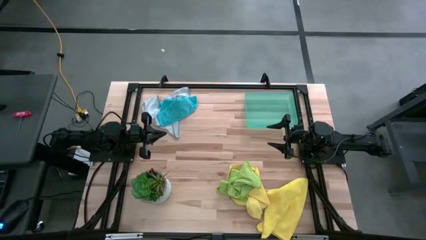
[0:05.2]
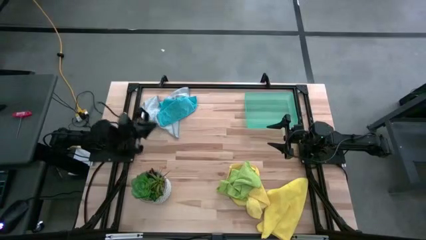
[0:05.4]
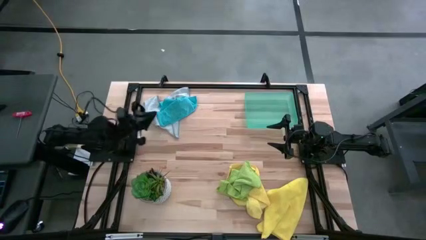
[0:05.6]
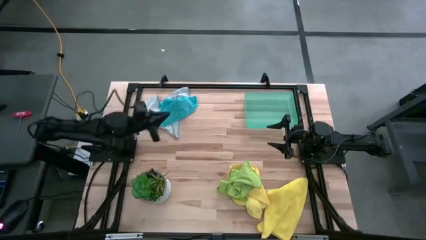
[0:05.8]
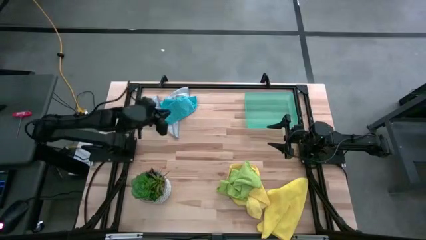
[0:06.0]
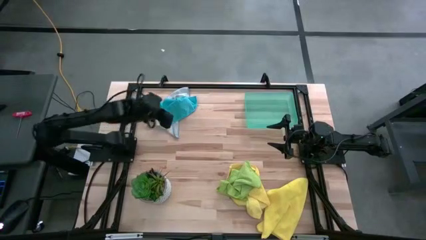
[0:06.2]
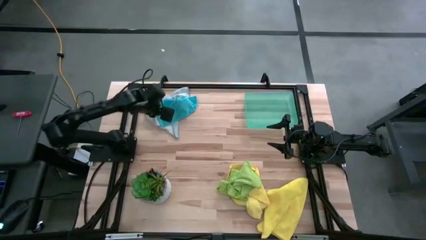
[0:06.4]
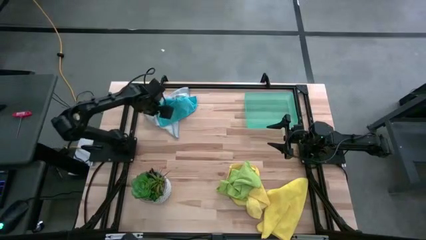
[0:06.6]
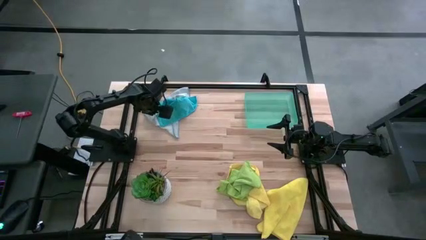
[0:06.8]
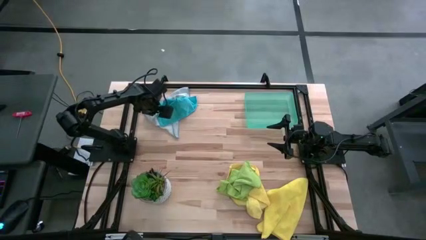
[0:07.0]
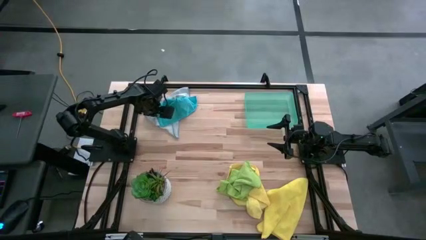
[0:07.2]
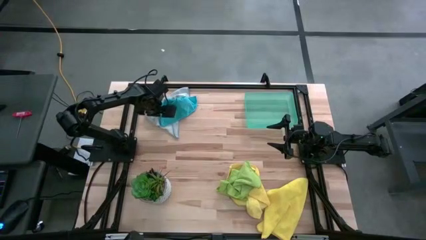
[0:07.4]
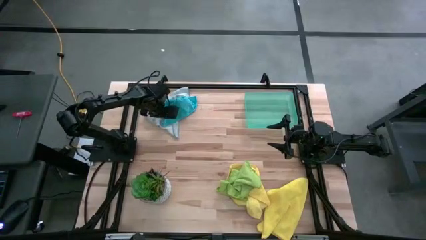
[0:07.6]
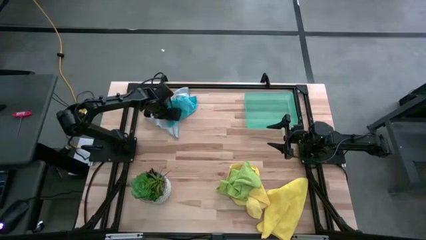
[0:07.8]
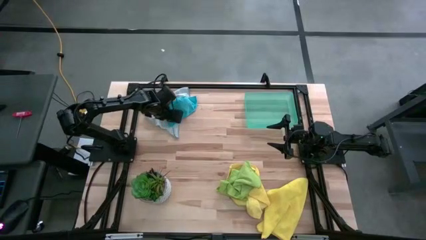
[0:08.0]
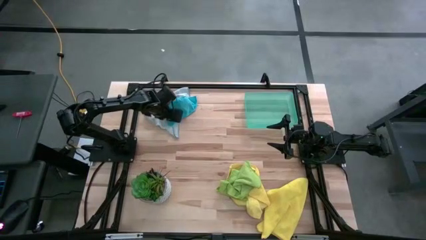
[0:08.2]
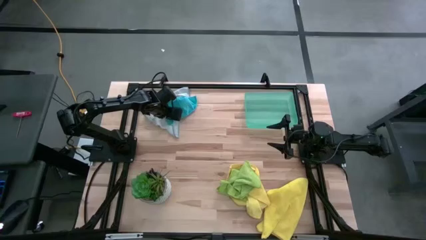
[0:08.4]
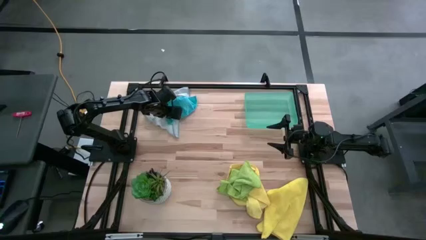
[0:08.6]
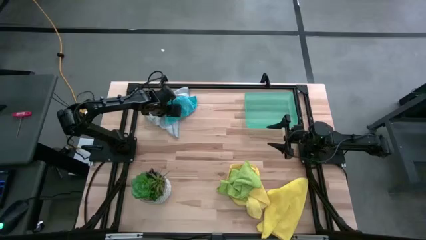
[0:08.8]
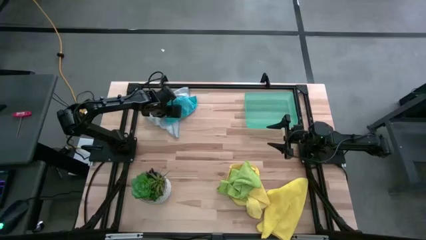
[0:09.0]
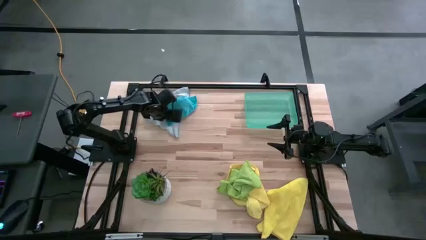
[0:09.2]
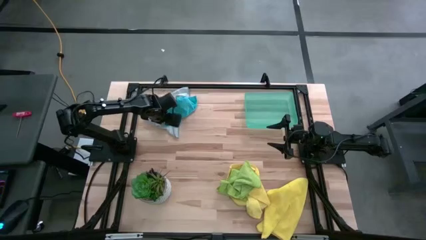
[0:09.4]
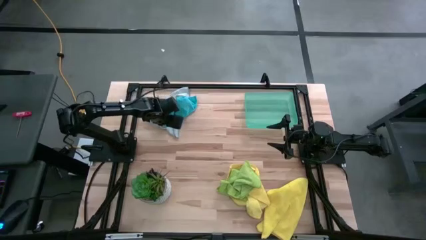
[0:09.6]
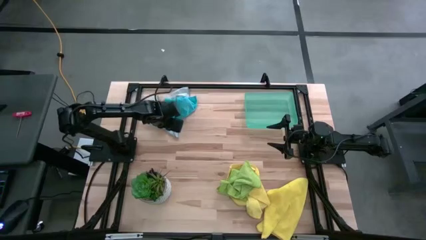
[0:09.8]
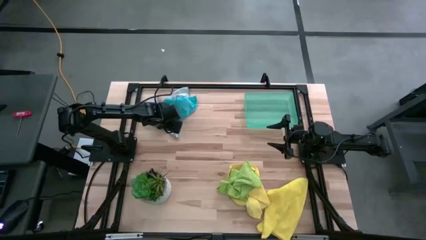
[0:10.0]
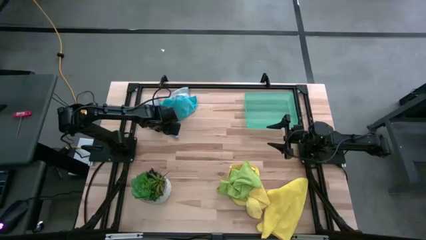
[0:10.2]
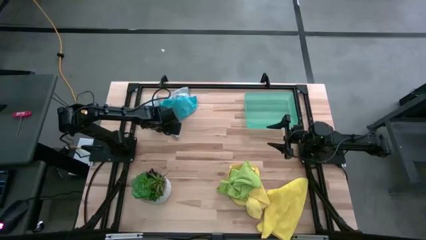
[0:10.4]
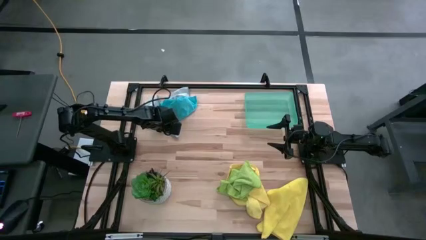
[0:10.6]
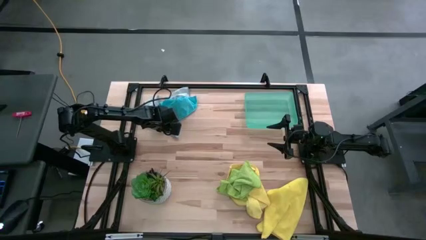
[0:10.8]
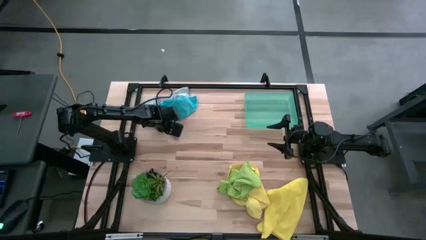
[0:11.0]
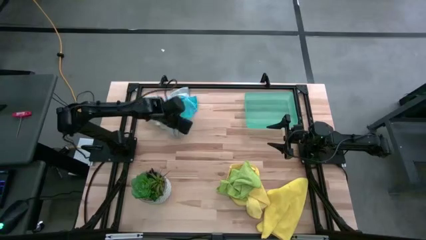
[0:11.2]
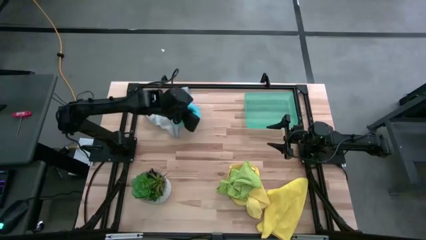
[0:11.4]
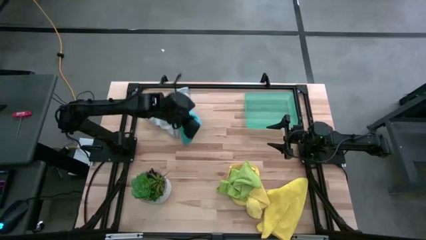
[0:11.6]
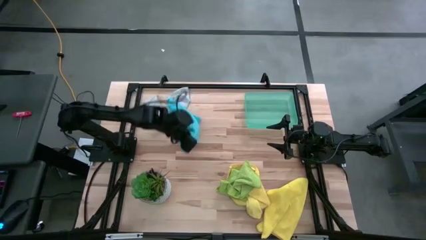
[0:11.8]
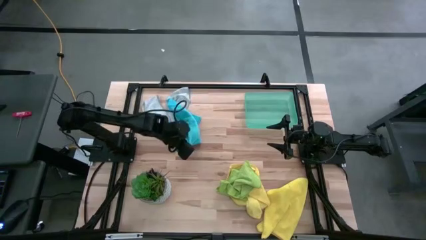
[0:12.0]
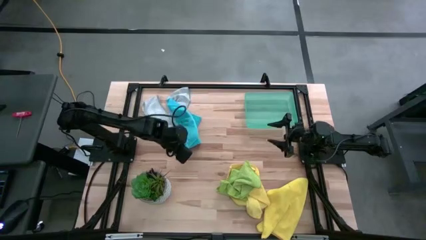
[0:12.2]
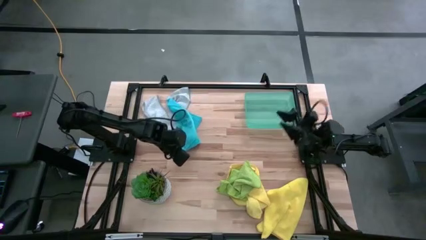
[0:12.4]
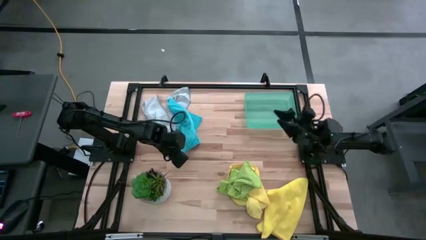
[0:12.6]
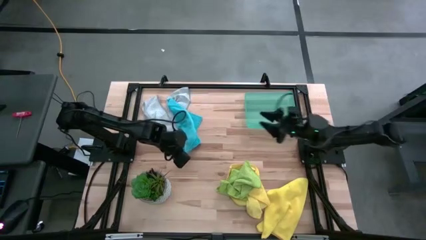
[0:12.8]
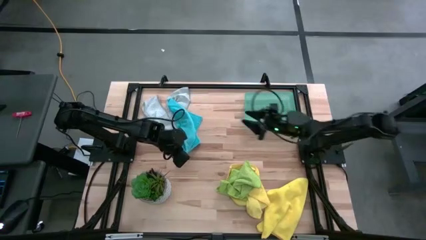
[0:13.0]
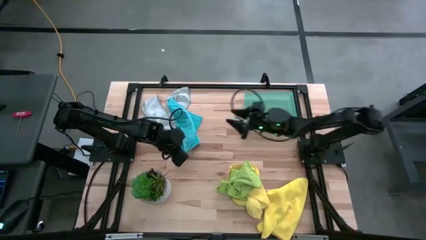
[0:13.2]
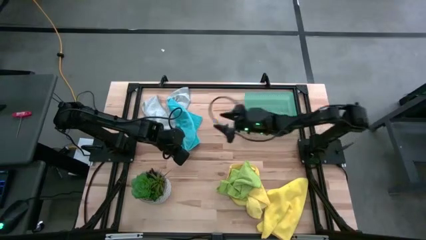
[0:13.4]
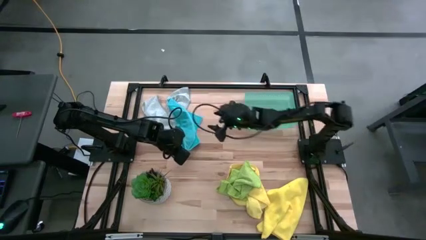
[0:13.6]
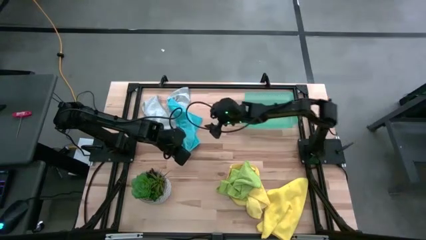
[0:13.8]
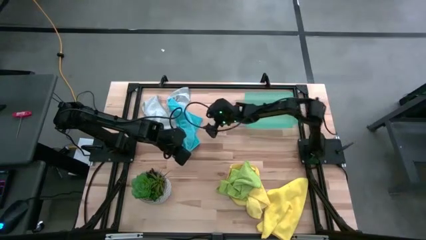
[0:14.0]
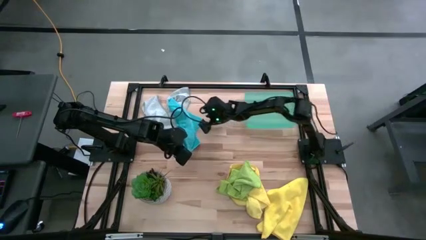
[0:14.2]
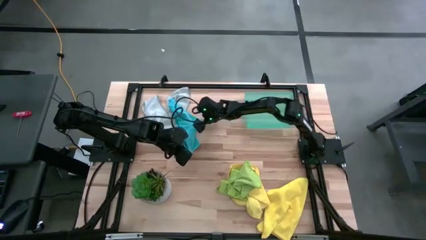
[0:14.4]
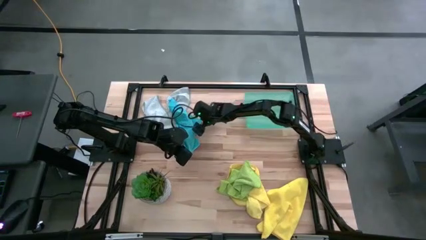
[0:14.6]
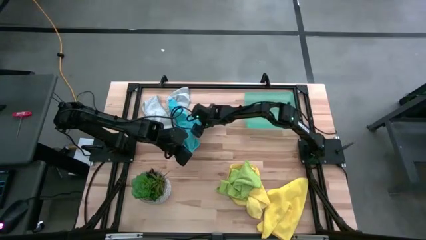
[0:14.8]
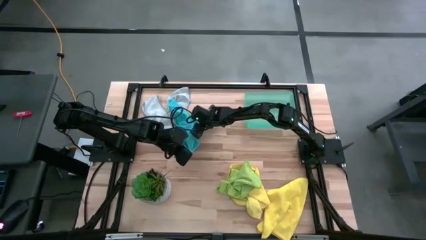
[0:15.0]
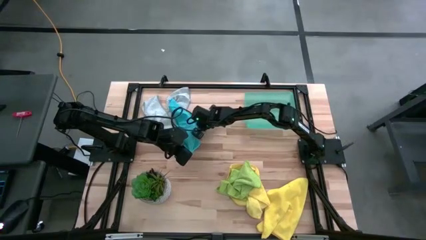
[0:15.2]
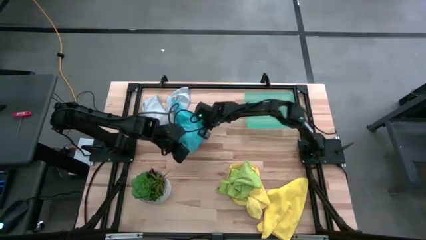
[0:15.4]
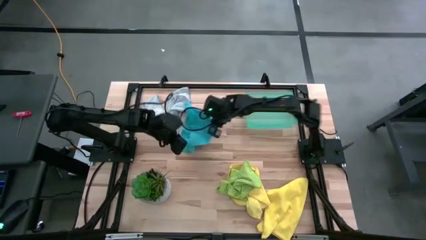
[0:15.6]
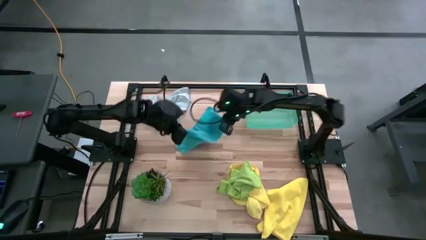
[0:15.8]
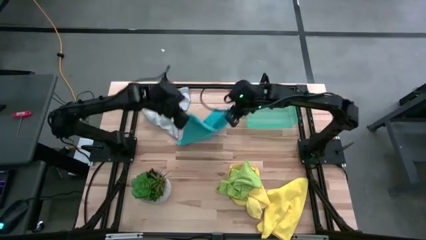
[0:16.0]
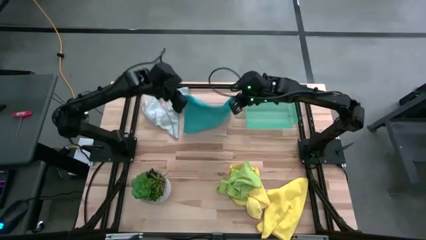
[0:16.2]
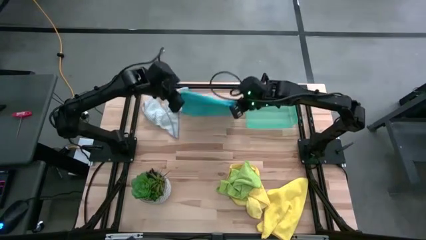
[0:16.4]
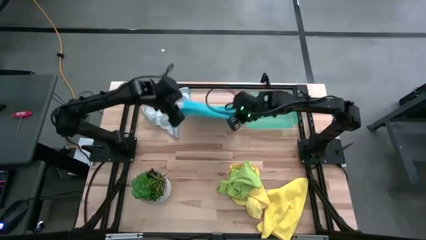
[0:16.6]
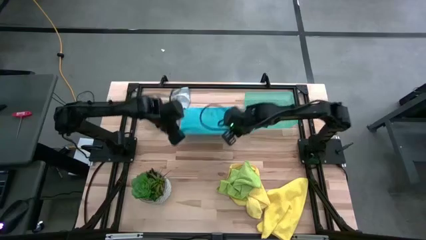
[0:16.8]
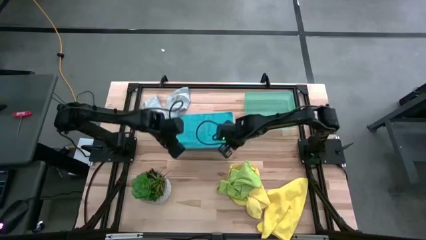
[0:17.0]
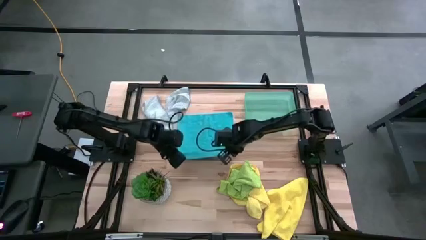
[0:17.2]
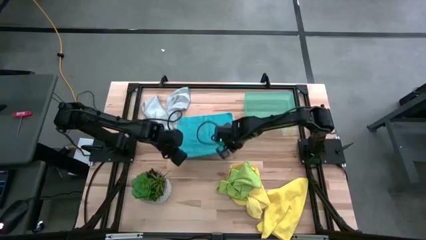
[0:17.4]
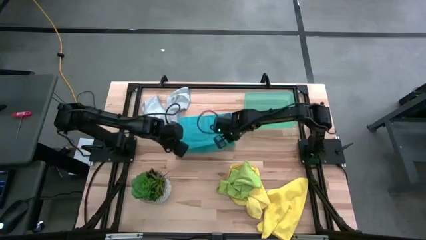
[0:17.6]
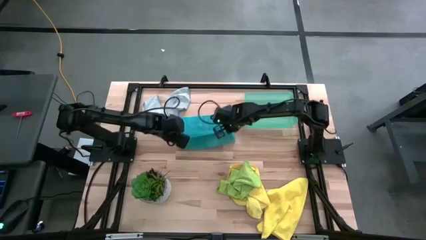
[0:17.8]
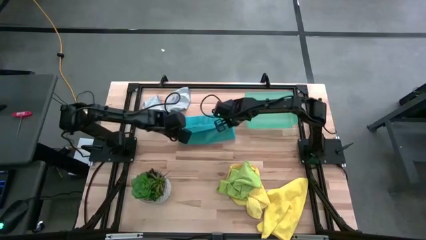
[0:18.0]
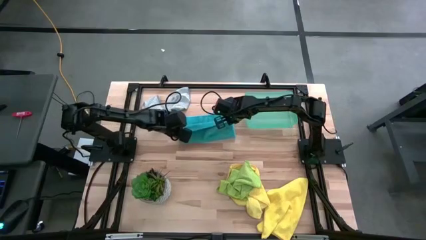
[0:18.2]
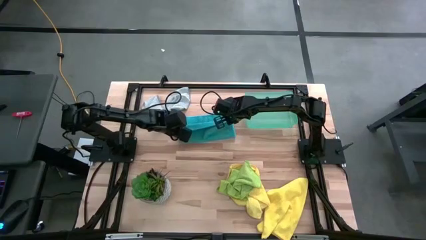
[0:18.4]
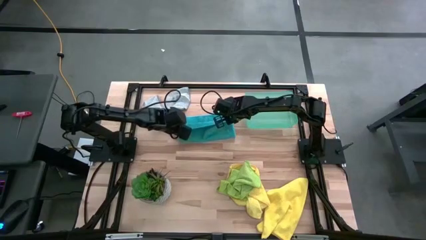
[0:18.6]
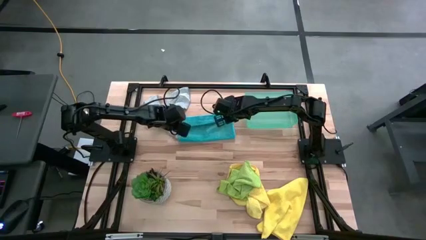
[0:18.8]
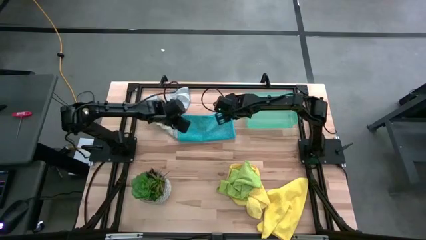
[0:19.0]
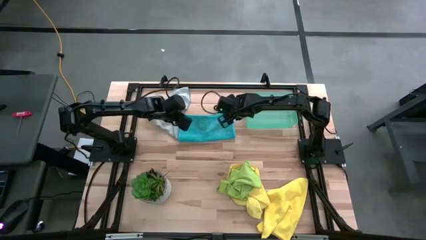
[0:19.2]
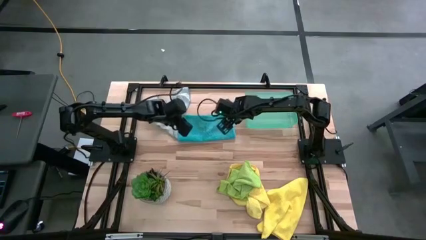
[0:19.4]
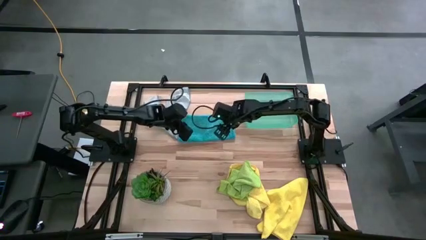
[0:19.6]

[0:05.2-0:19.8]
Task: Fold microfiber towels
Fold the blue towel
